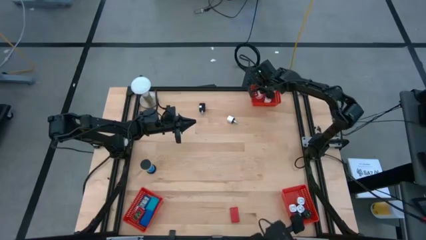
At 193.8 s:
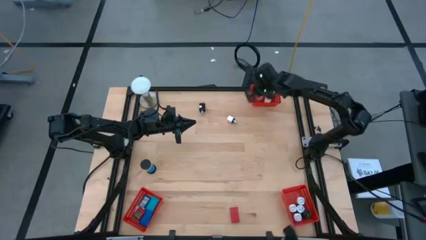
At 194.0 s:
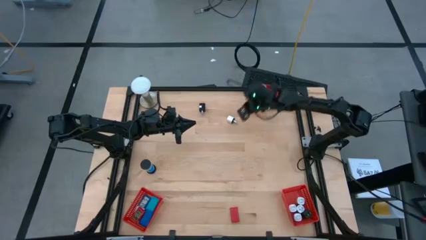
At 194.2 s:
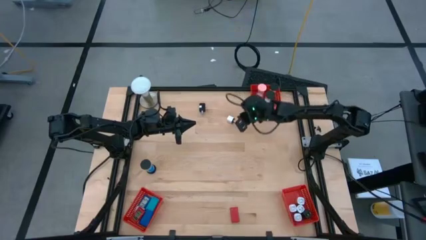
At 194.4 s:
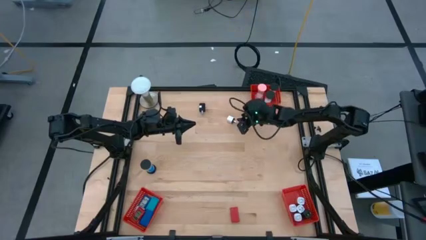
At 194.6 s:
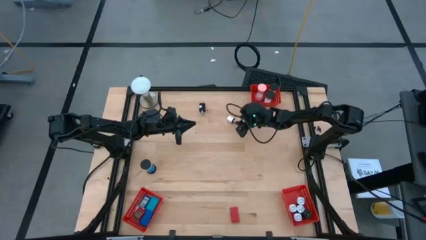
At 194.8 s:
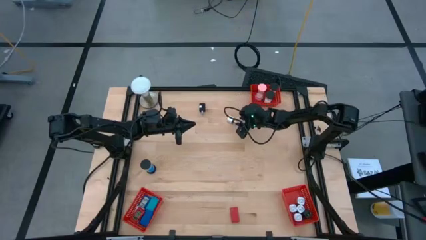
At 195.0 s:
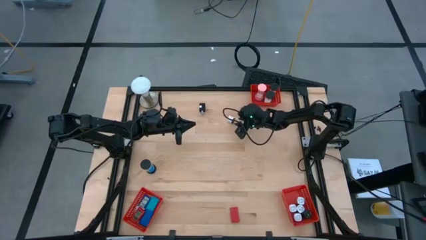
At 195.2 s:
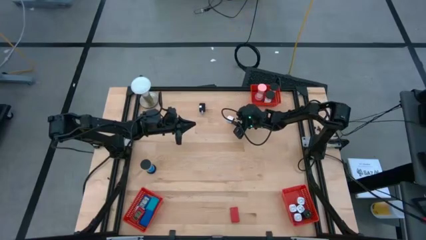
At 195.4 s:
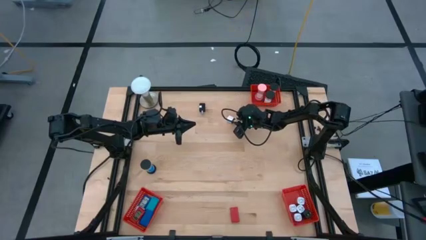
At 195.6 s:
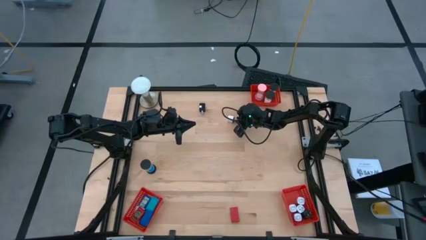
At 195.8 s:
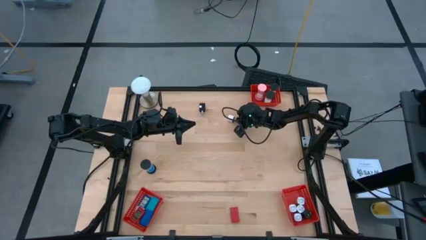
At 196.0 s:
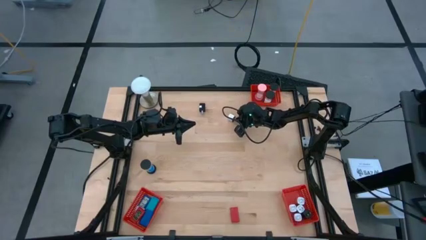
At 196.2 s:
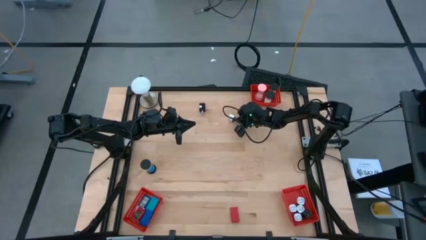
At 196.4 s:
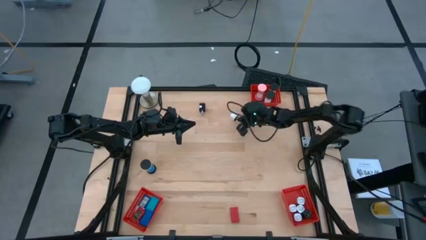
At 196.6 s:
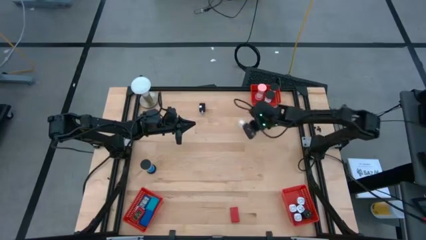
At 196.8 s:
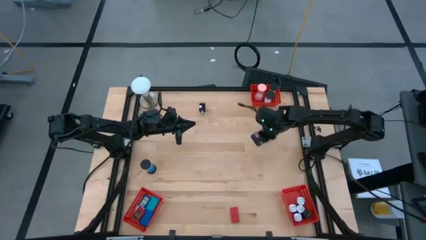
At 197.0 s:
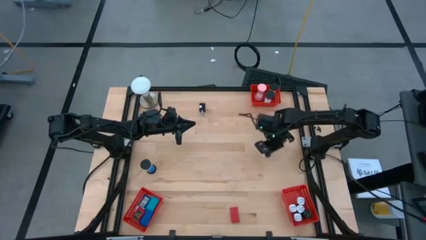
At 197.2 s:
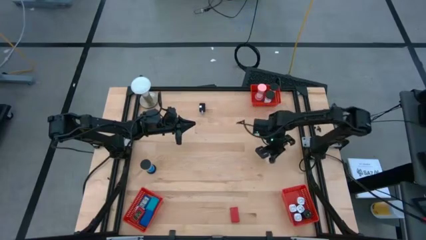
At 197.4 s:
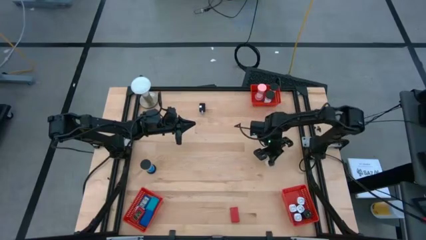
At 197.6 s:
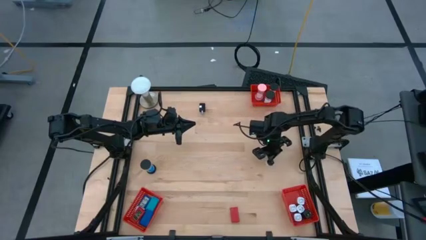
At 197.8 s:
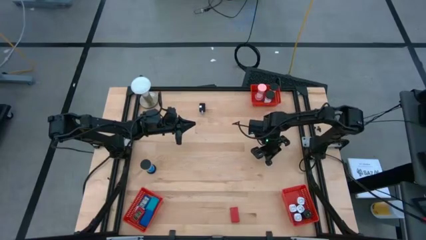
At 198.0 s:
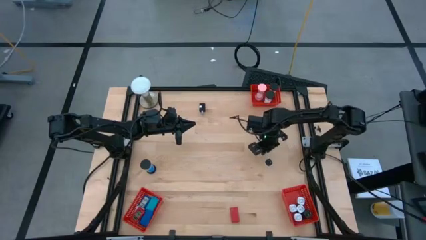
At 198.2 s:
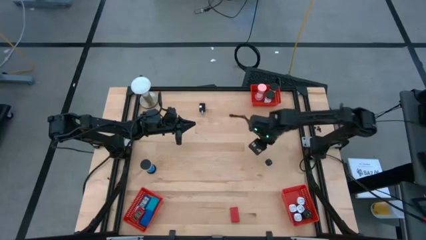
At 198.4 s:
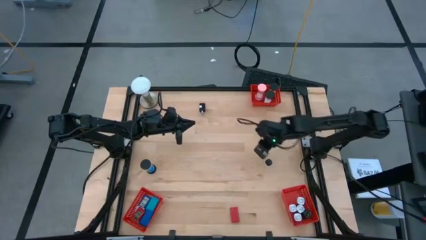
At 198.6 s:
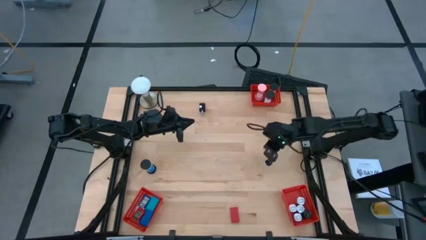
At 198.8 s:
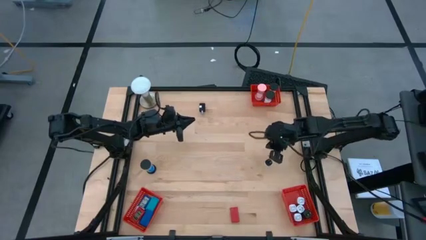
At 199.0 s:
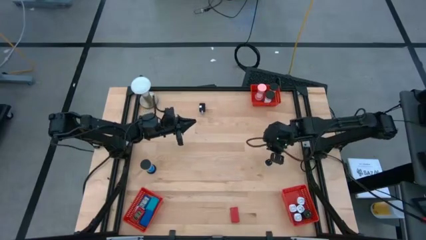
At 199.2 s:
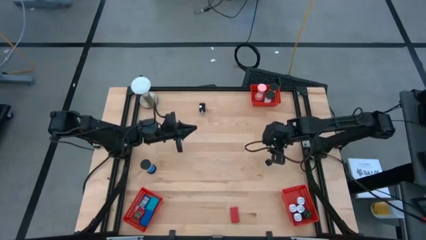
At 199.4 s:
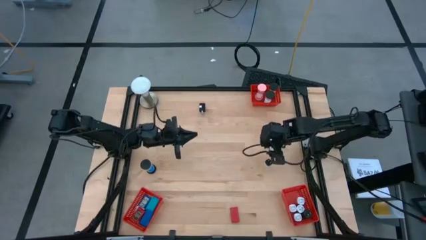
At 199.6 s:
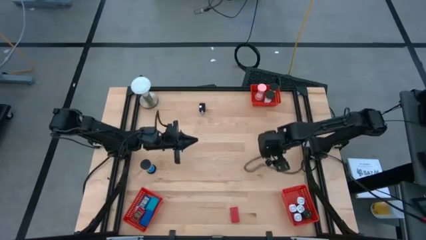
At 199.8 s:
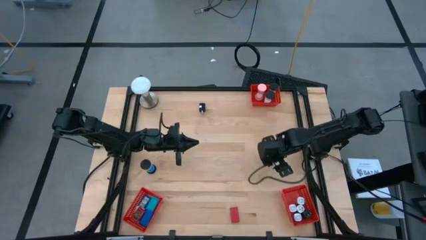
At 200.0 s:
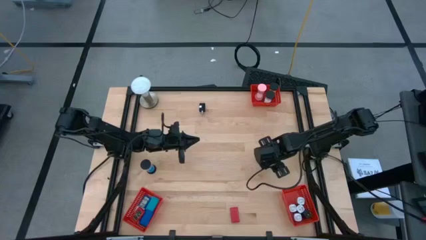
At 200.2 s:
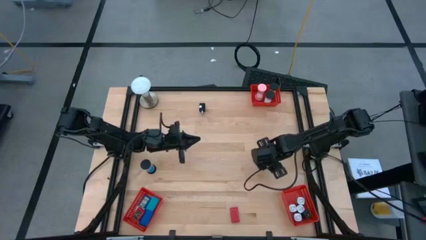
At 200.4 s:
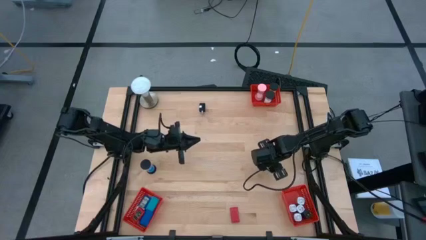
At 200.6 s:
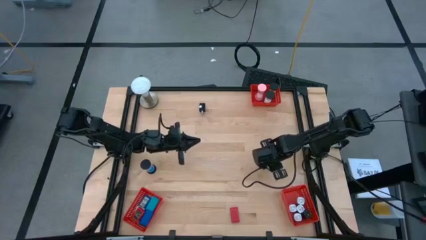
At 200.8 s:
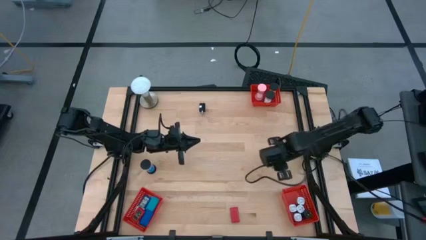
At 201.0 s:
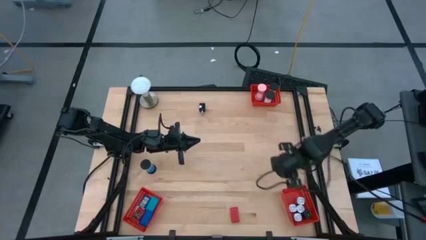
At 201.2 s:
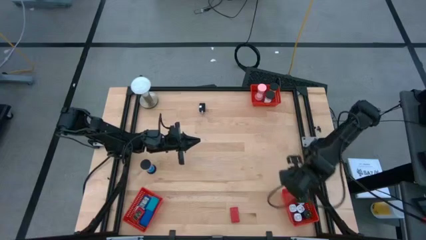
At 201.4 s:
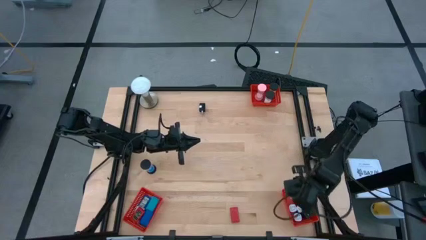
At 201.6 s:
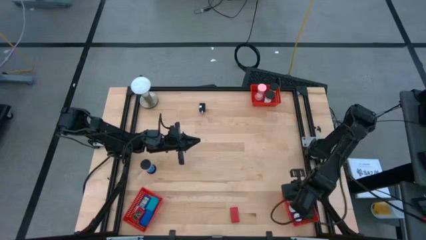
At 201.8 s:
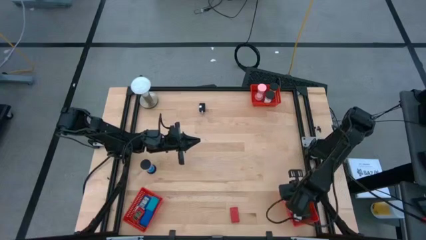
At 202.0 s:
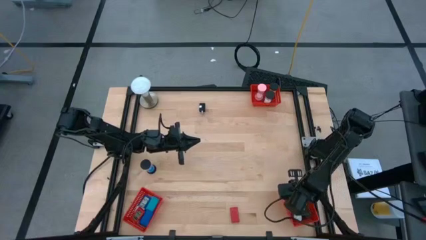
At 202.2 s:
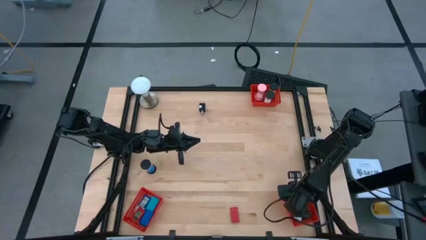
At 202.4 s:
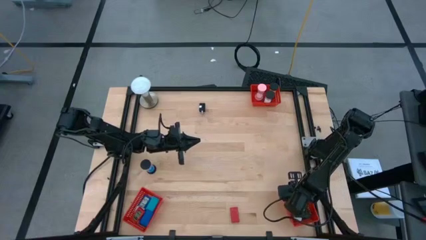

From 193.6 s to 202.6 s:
Task: Pick & Place Office items
Put the white charger adapter into the bottom right red basket

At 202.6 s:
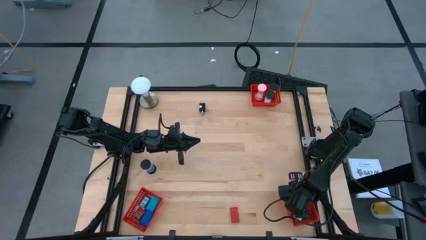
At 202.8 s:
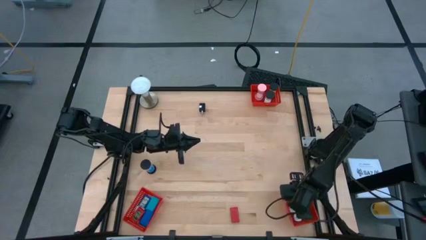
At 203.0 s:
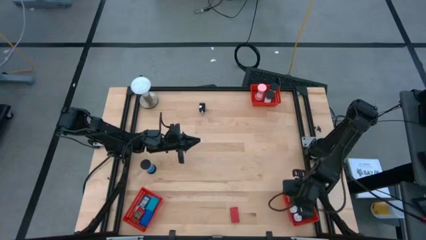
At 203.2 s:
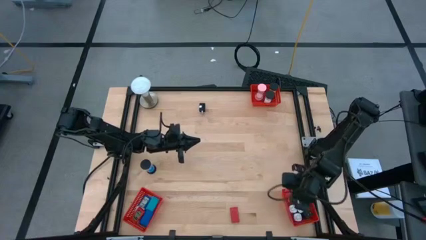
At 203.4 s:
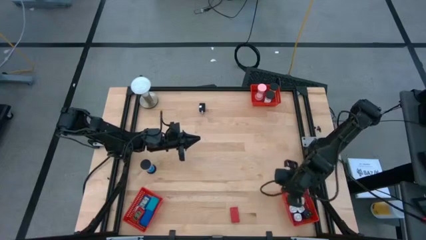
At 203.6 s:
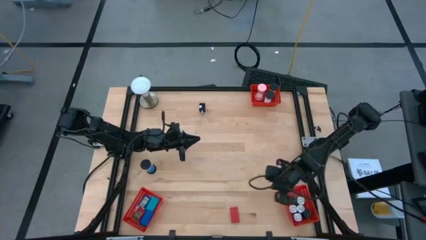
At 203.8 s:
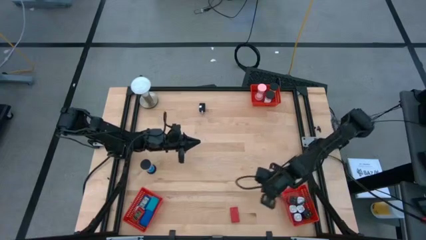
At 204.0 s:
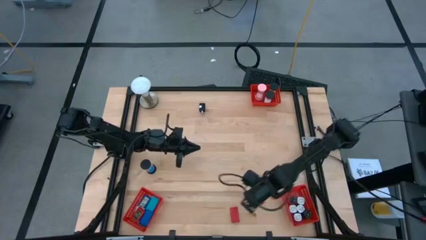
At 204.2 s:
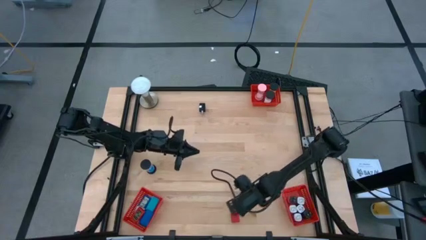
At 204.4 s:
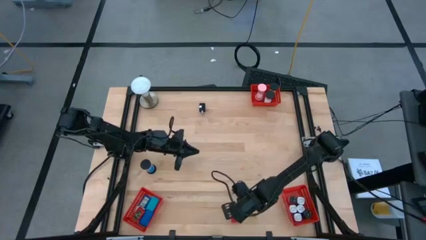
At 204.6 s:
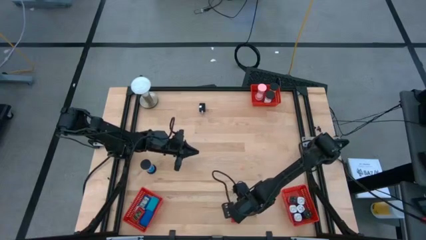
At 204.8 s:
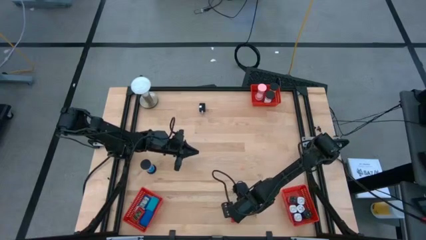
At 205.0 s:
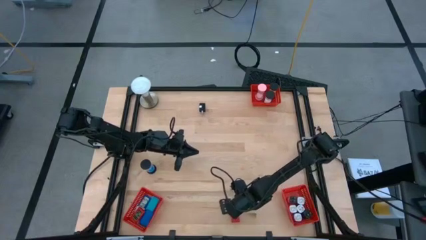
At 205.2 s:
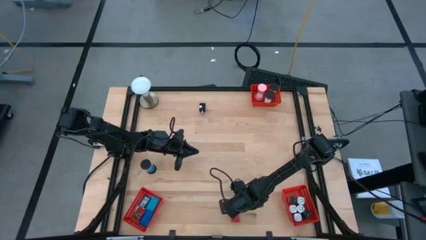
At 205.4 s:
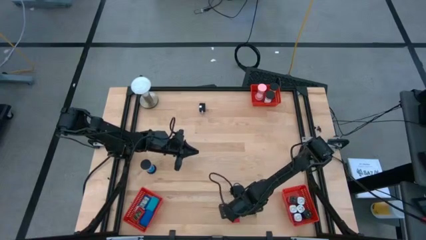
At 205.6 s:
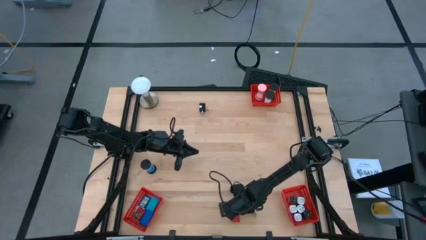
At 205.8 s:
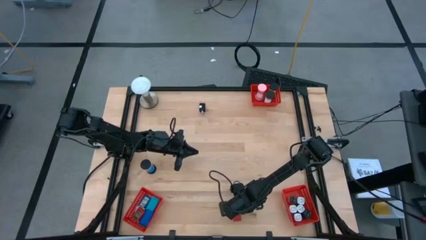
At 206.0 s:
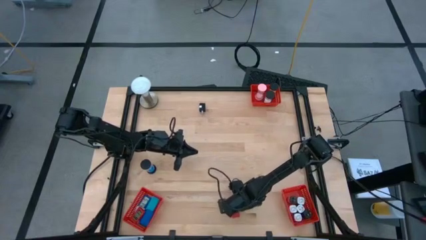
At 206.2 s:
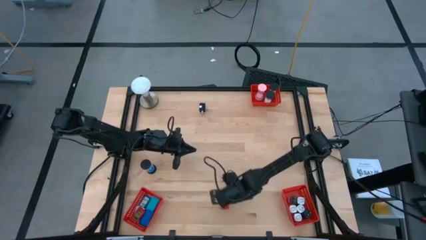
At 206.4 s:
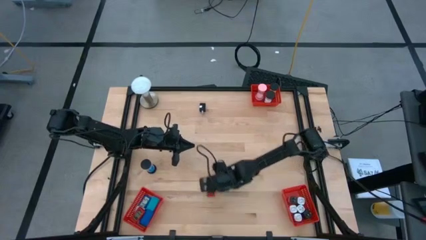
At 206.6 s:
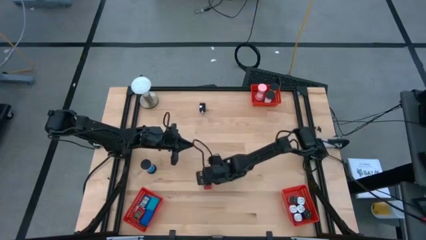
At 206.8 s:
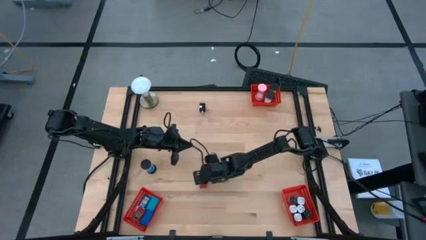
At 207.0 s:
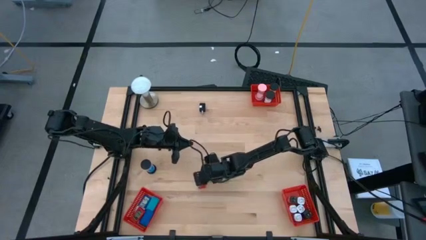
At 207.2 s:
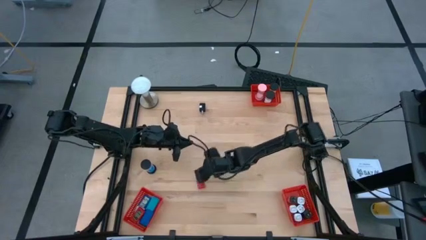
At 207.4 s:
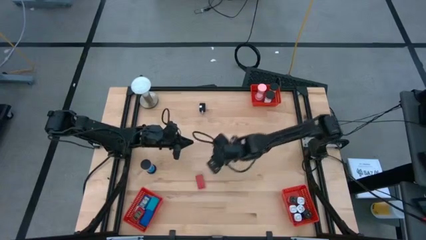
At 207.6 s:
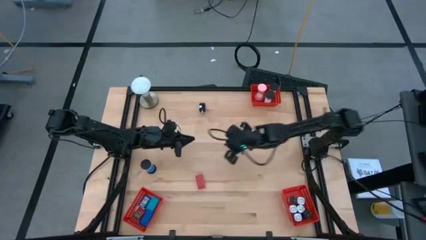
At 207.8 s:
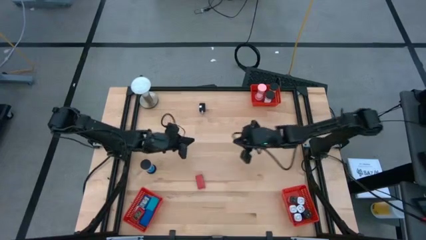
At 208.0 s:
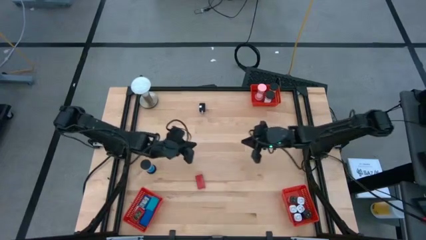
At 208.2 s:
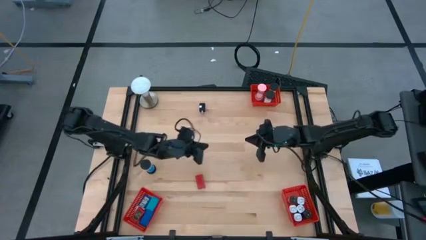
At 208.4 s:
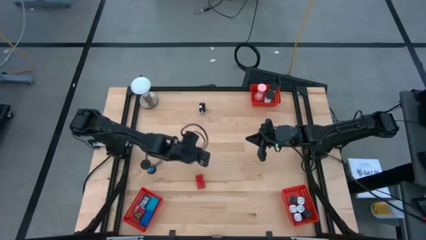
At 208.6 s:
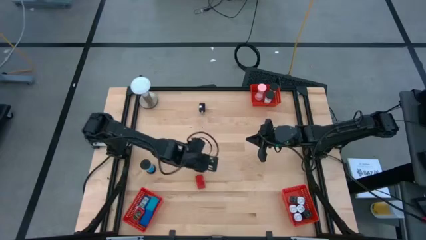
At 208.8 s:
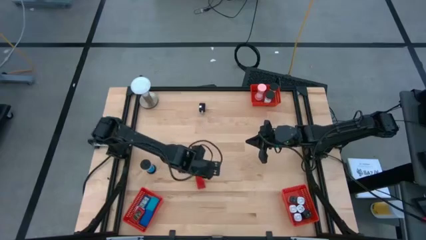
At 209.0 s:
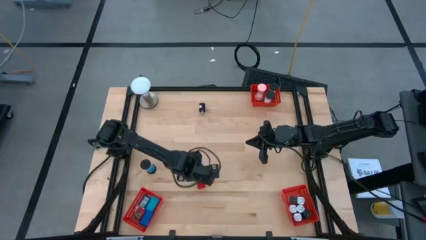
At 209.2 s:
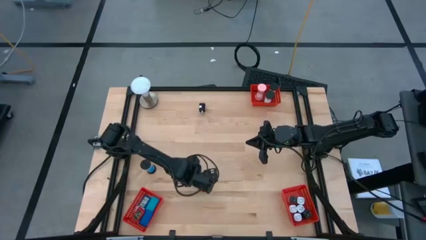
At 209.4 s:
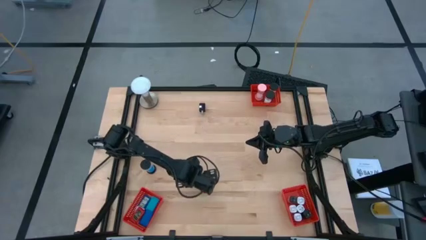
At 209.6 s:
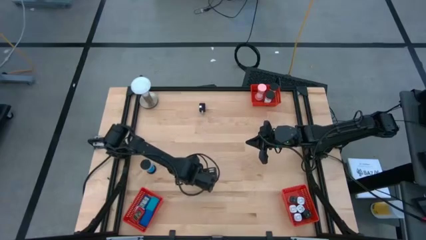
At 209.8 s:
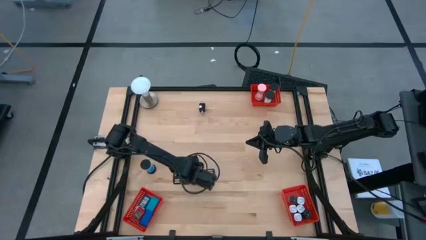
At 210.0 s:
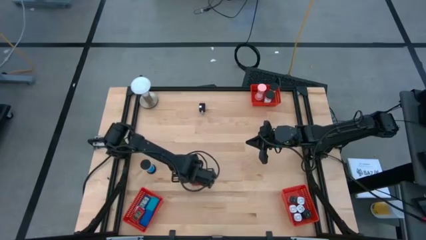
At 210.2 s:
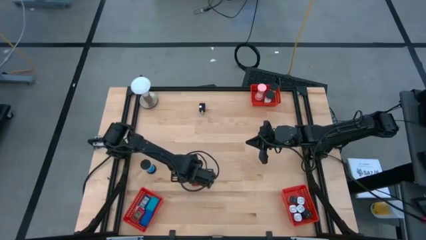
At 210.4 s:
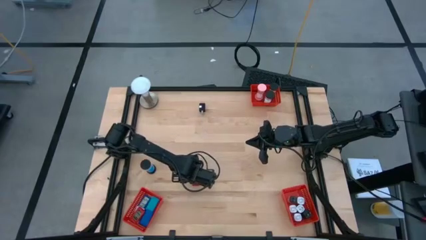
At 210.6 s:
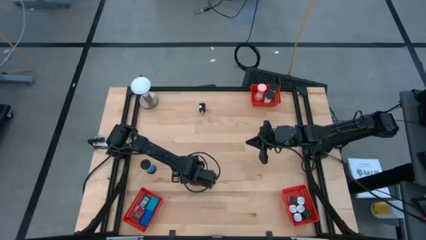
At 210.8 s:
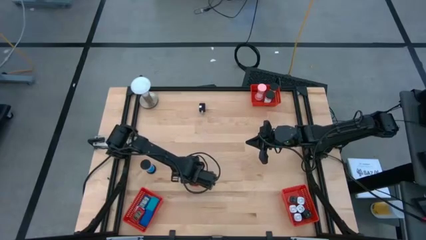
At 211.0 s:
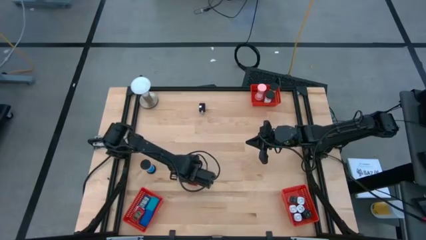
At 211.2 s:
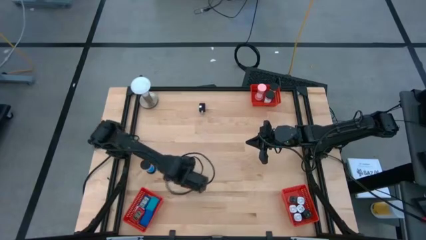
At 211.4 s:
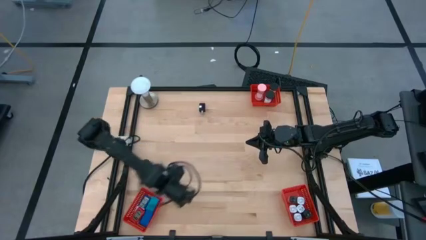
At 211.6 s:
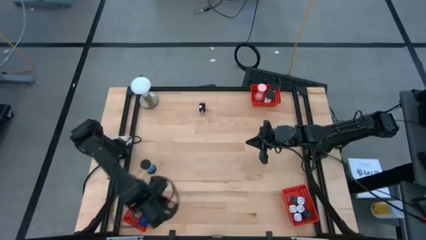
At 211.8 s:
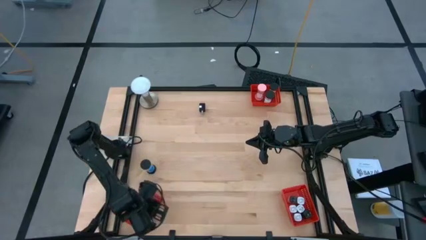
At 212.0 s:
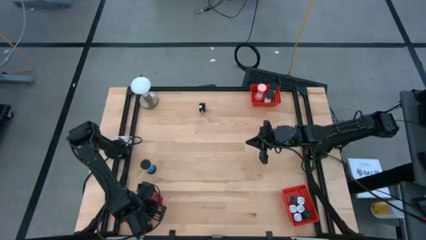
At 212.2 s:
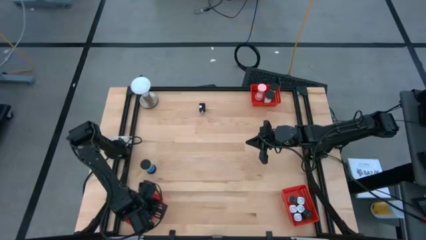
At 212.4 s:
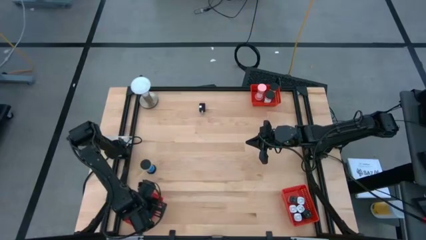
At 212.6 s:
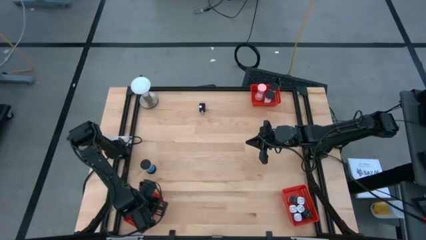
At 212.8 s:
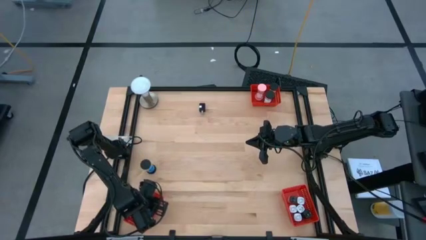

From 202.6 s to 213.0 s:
Put the red digital clock into the bottom left red basket
